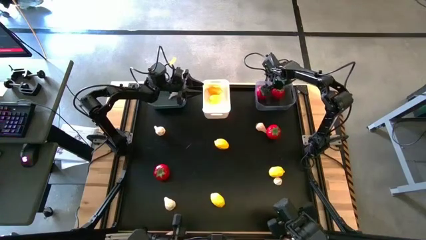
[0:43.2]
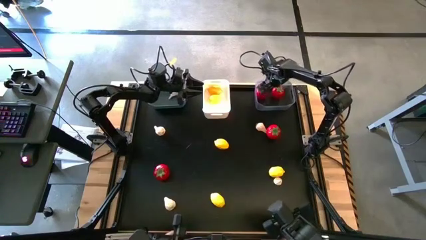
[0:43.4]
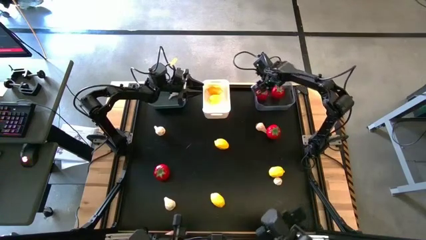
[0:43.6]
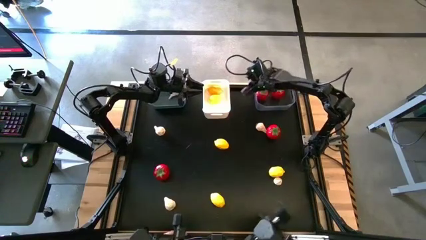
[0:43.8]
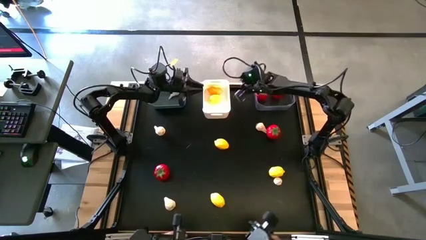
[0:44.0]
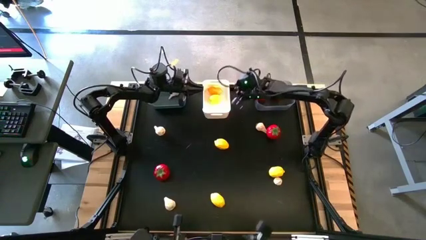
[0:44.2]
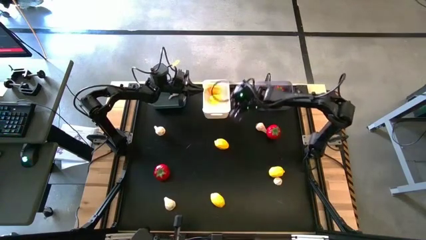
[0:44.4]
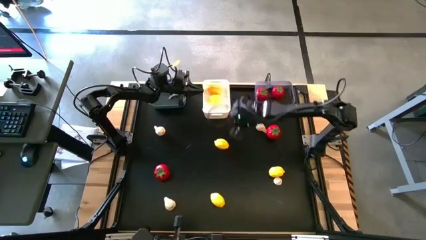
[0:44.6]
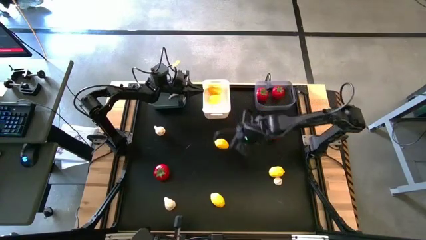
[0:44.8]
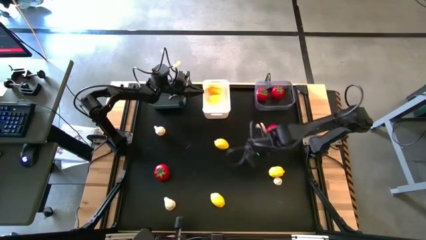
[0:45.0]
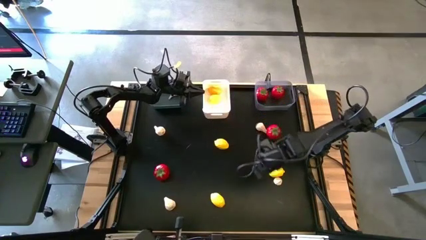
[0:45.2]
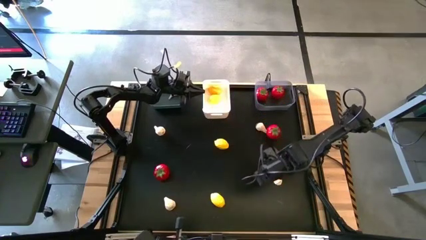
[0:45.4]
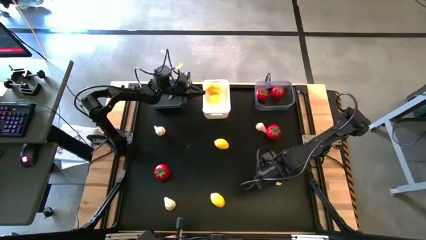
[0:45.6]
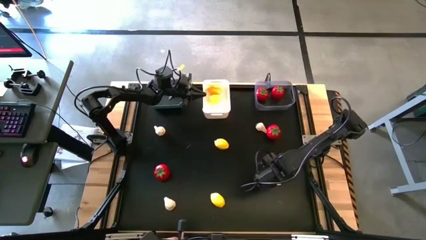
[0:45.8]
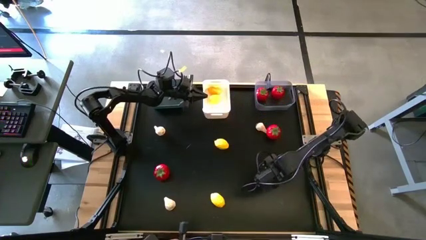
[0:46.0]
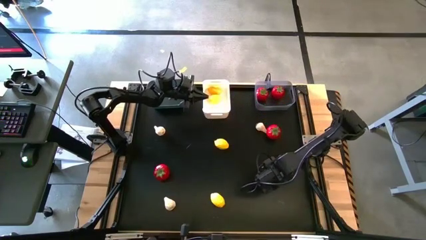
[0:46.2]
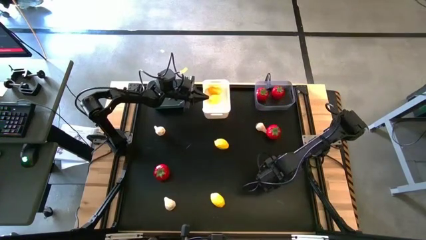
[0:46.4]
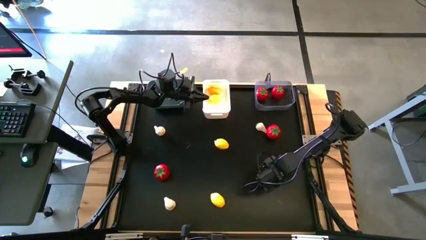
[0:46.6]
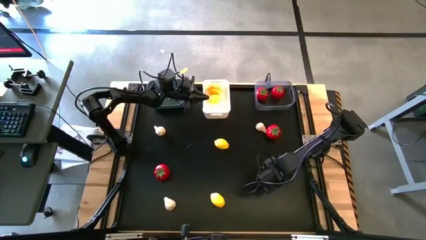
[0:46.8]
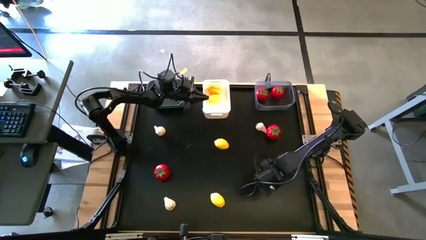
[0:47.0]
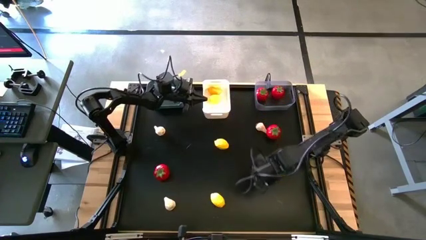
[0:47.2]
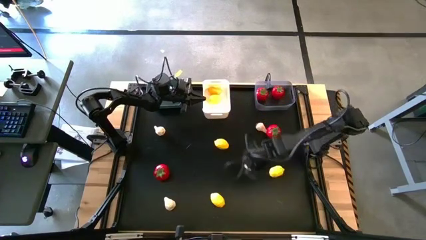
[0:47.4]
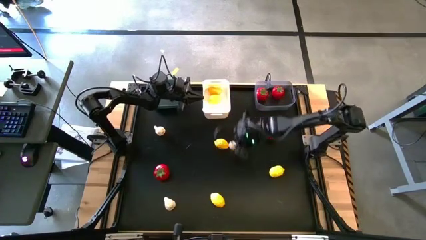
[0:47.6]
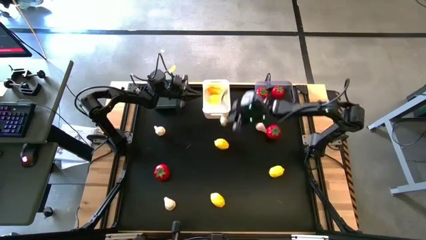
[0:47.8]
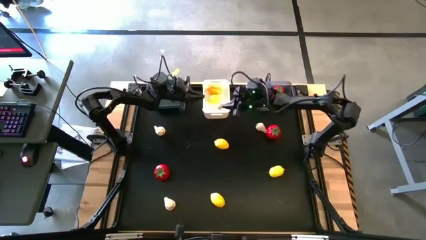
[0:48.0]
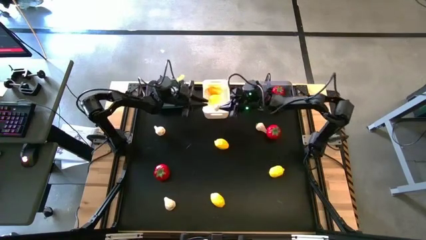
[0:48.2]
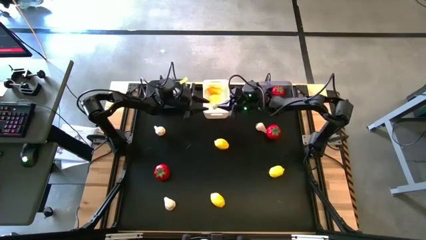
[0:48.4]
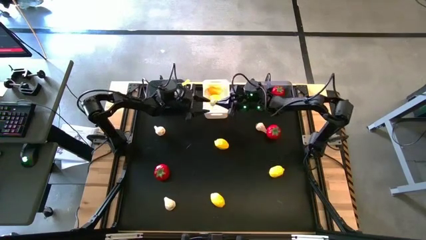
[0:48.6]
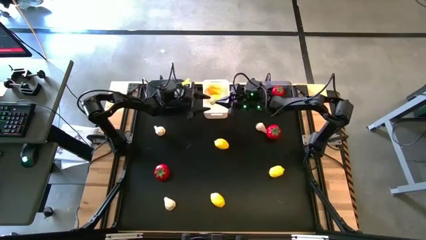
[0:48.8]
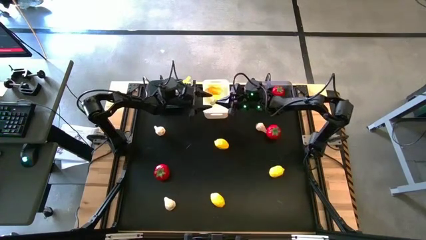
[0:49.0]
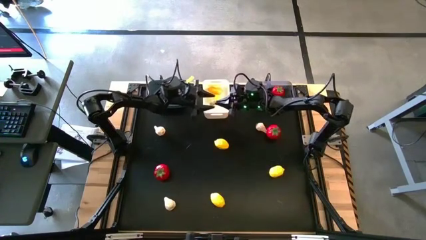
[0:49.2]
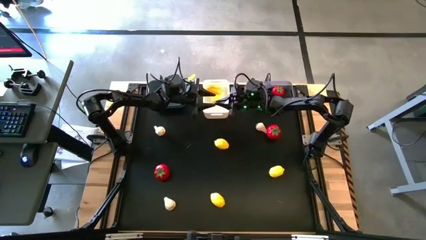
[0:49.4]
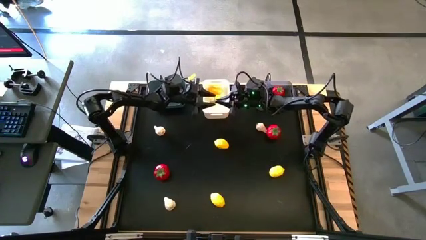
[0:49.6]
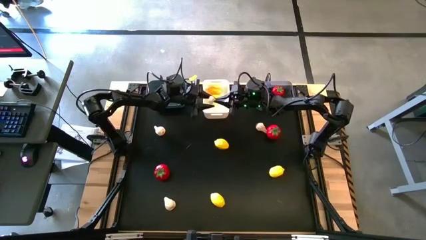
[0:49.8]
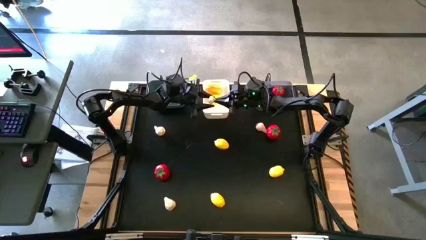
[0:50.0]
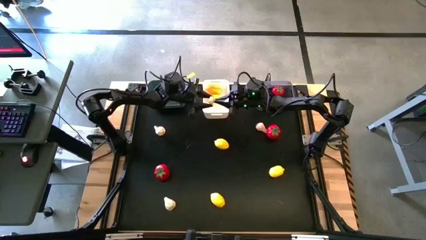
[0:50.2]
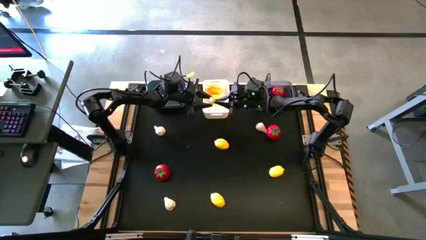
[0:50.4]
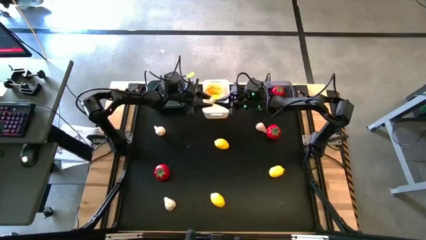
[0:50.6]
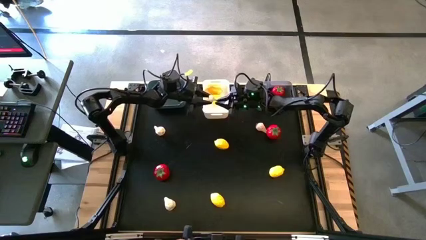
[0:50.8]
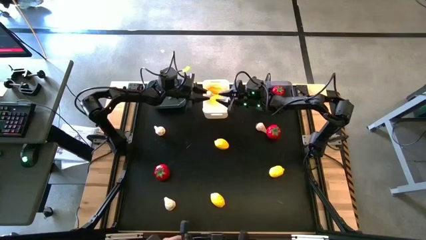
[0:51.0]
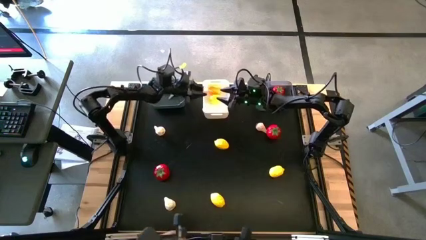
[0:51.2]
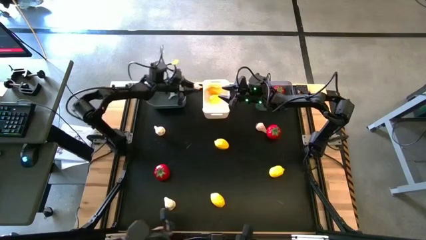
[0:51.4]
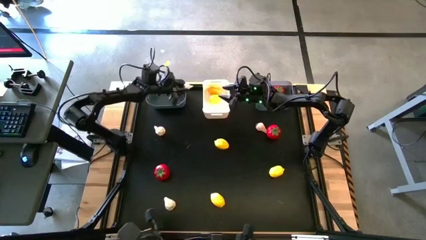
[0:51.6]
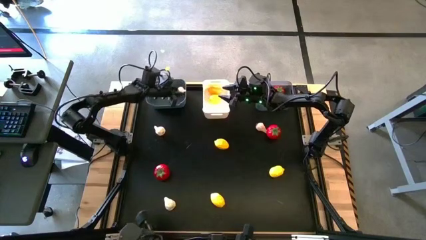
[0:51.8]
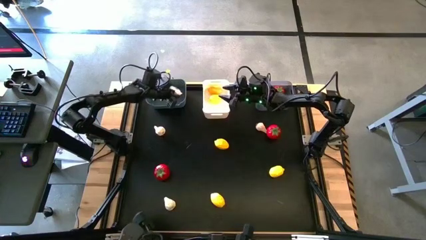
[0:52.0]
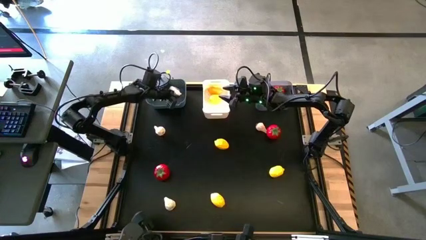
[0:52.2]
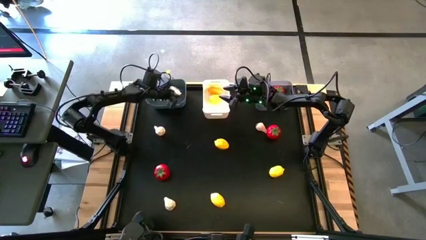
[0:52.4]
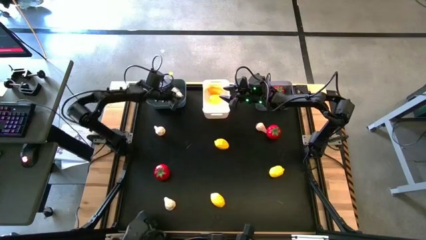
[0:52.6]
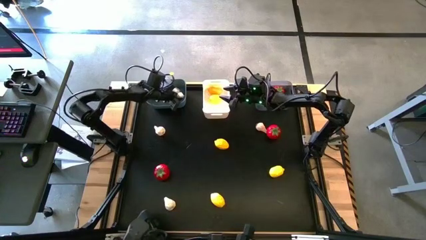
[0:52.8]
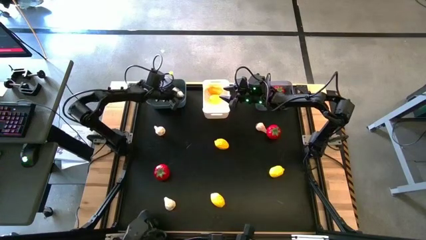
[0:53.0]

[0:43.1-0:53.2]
Task: Sort produce into baskets
Put the white garlic into the blue bin

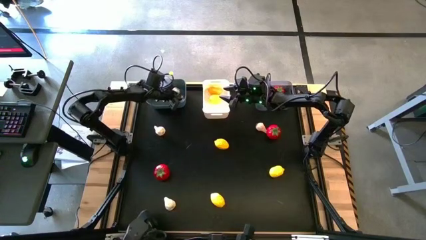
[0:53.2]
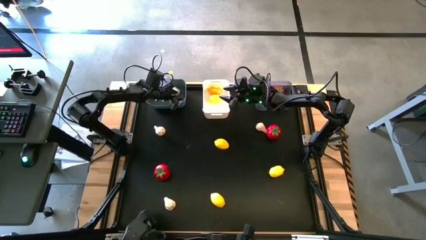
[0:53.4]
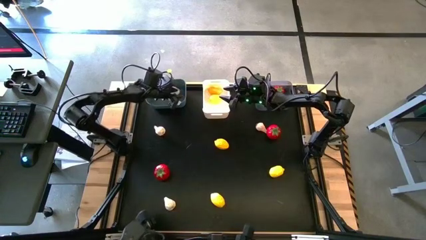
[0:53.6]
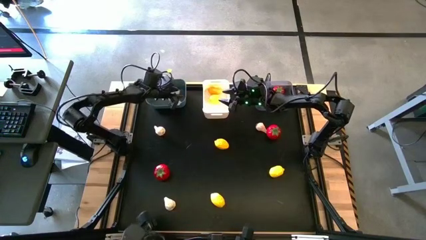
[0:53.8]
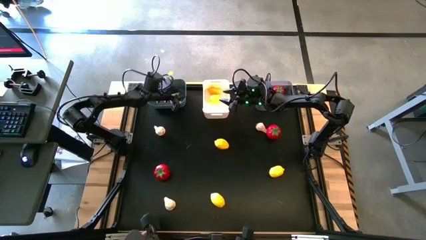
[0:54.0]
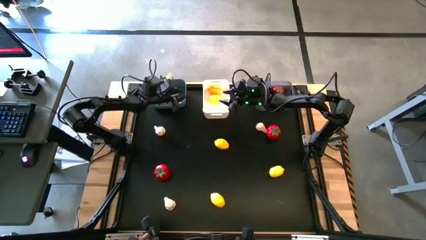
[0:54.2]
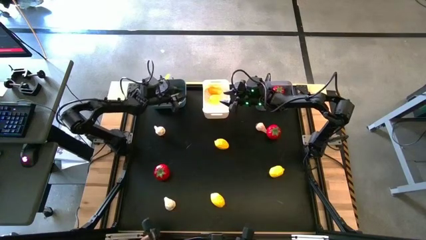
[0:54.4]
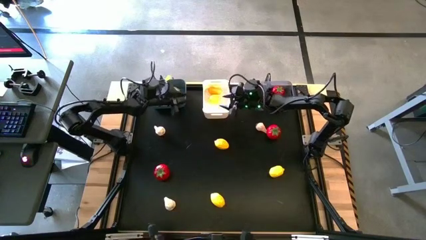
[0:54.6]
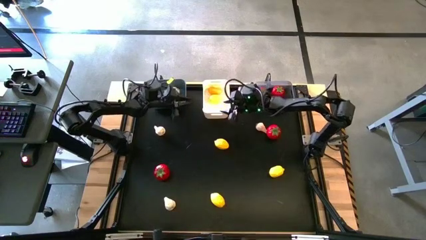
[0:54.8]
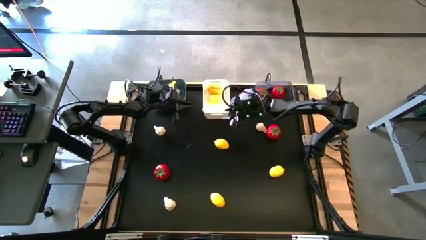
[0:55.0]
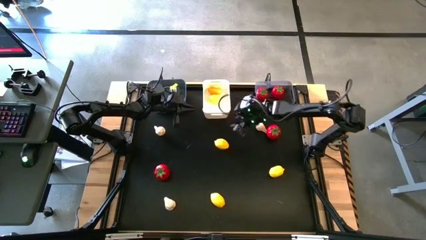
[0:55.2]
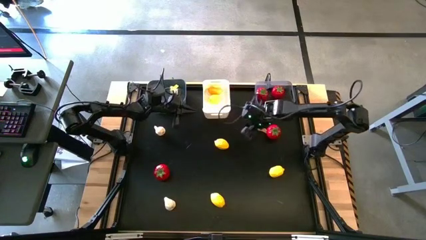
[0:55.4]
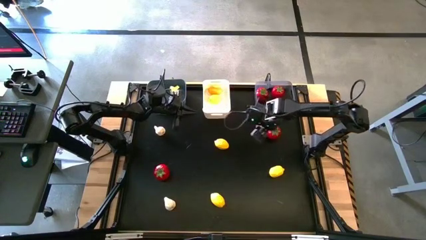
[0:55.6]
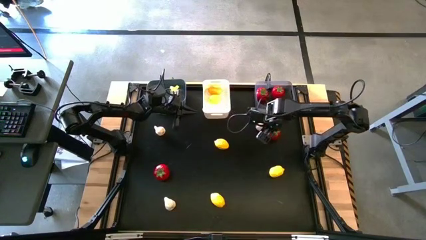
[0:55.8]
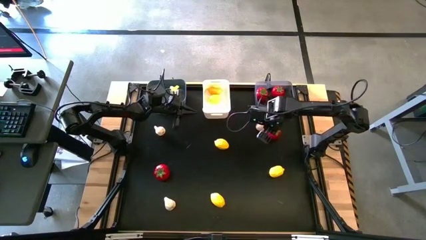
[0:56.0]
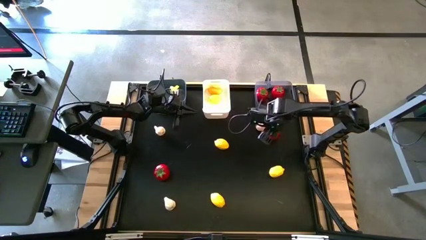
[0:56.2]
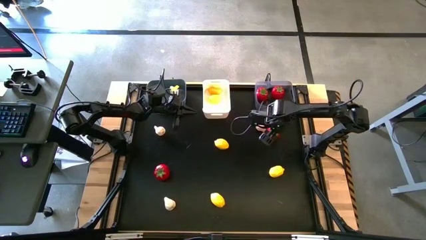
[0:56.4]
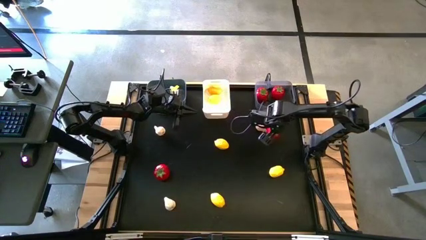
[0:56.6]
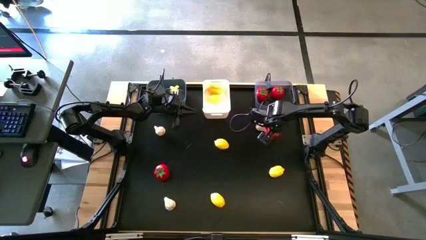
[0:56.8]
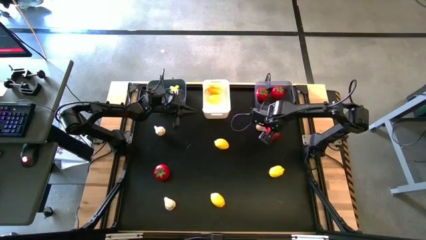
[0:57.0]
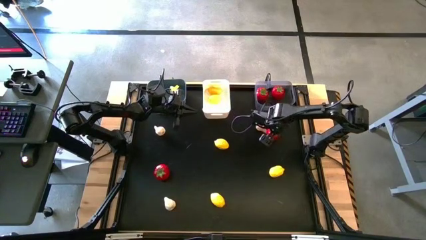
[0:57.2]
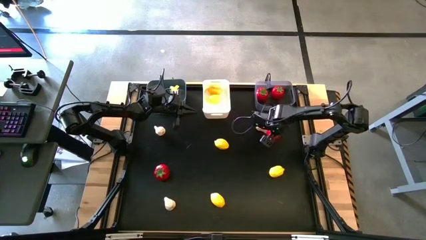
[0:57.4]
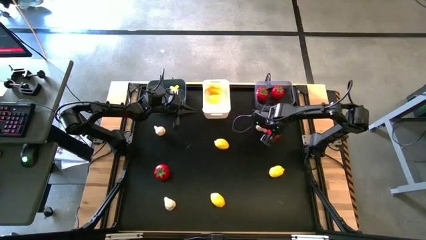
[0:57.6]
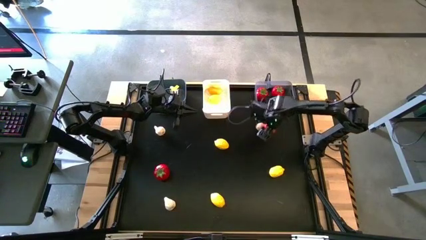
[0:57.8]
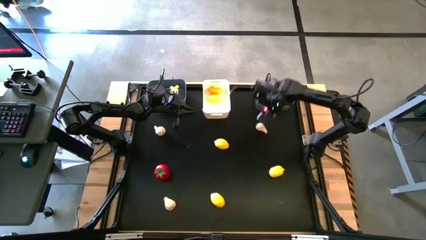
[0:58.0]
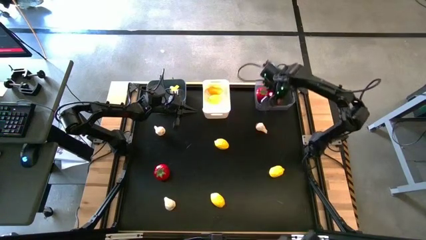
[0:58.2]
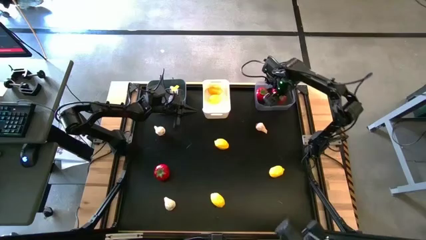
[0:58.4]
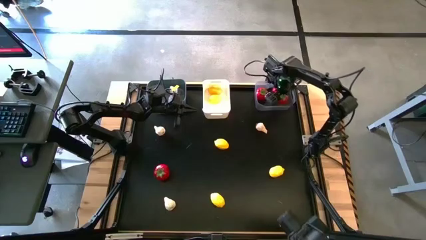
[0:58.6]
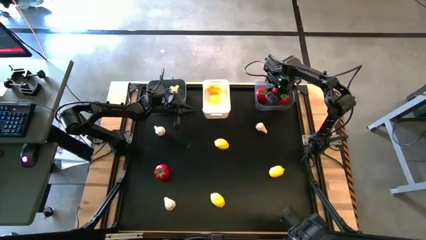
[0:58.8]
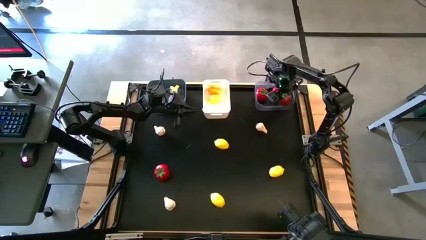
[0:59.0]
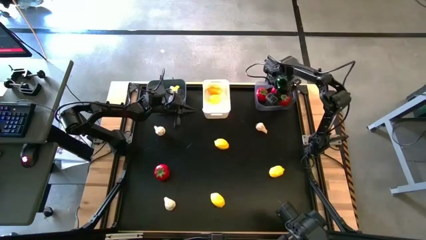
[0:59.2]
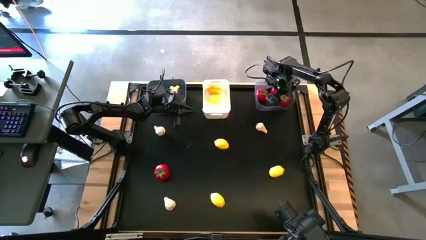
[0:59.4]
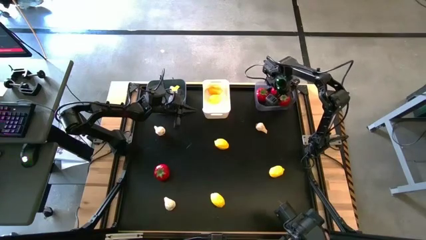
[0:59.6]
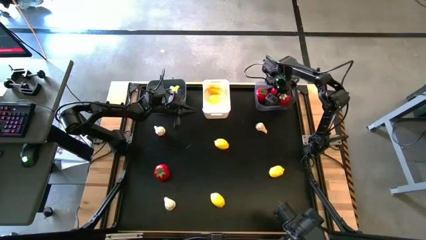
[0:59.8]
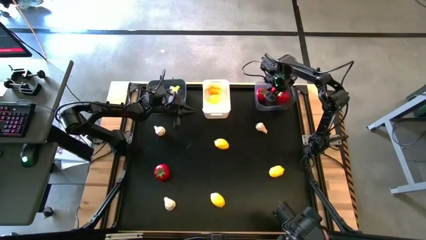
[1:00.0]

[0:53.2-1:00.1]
Put the red tomato into the transparent bin
